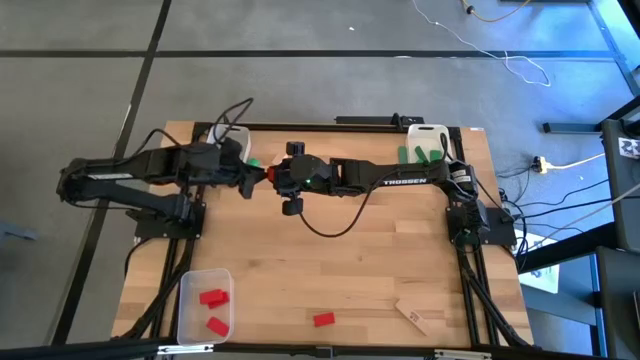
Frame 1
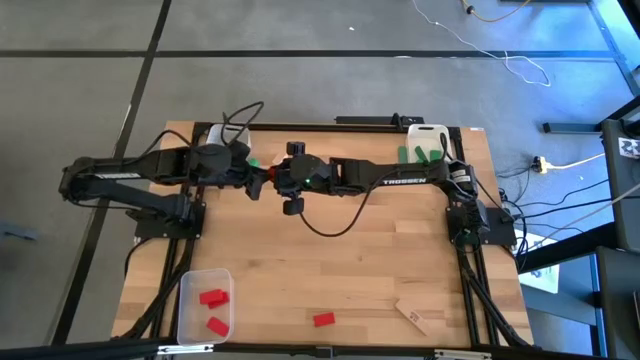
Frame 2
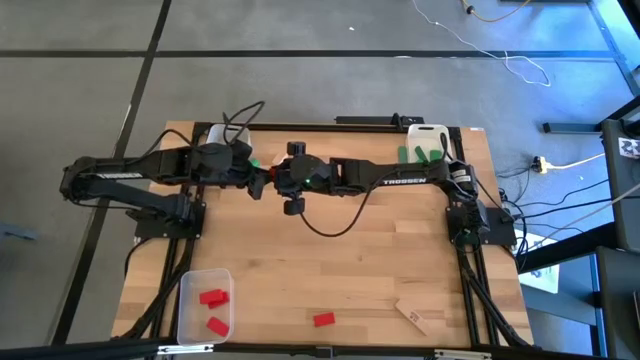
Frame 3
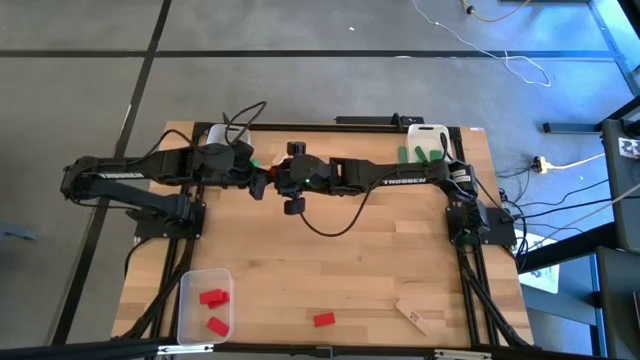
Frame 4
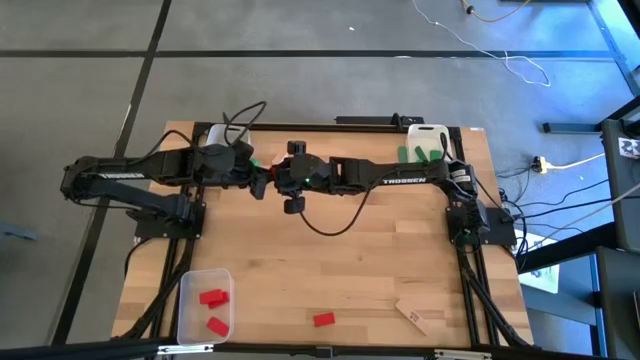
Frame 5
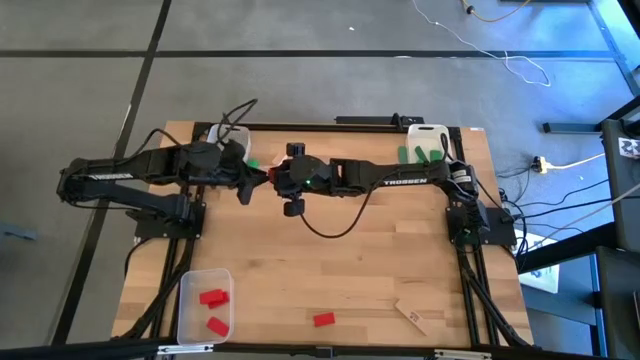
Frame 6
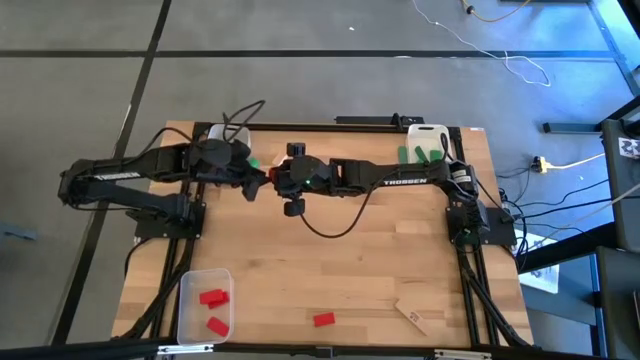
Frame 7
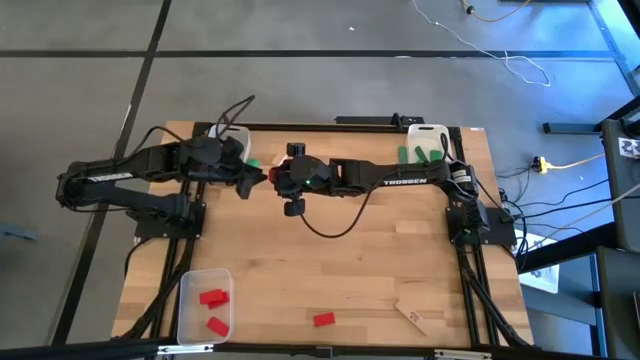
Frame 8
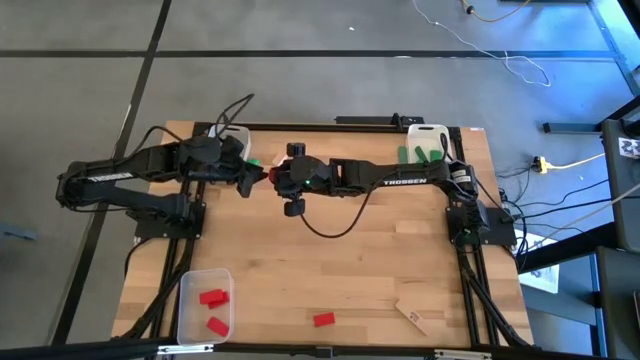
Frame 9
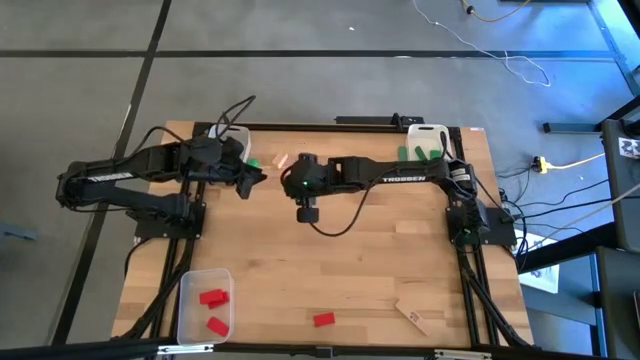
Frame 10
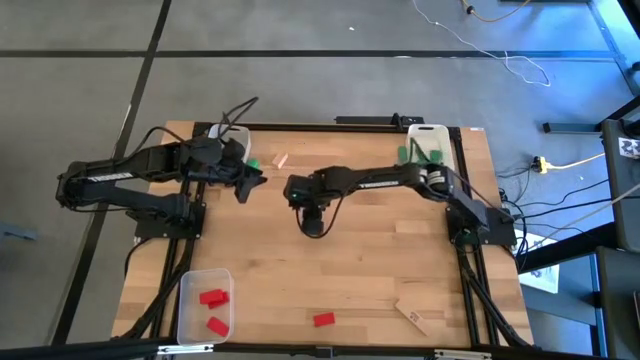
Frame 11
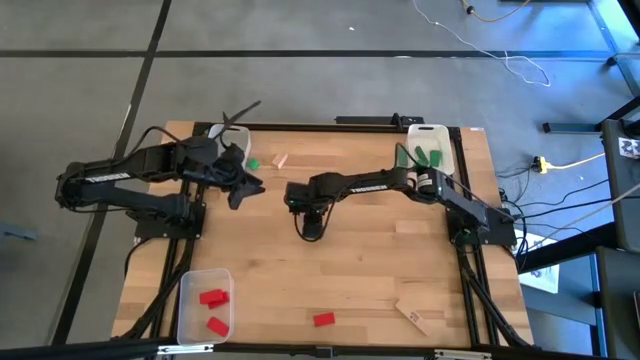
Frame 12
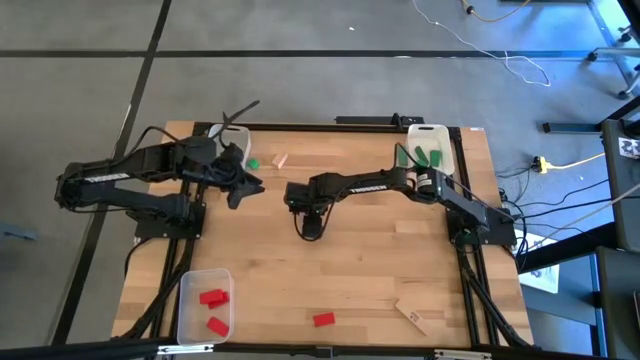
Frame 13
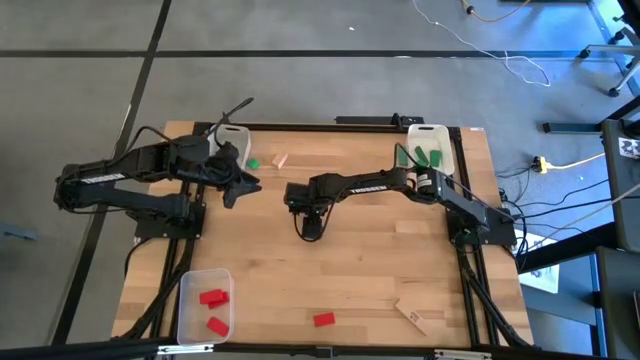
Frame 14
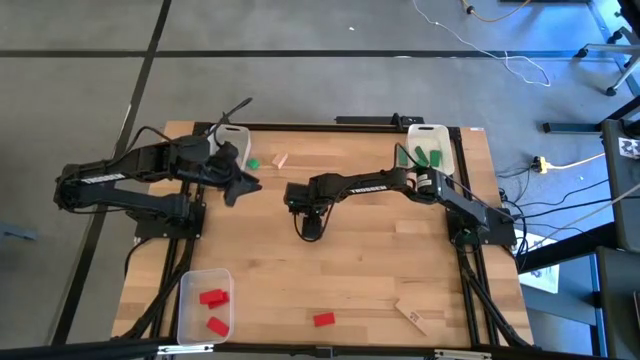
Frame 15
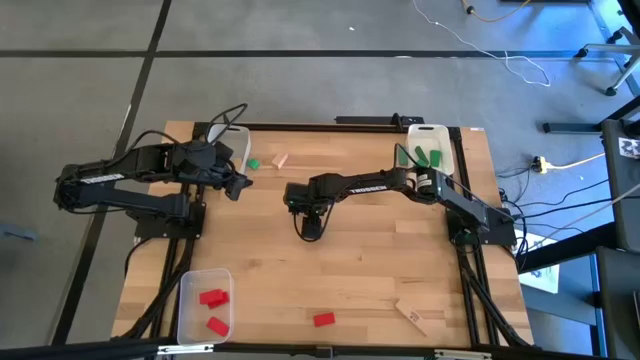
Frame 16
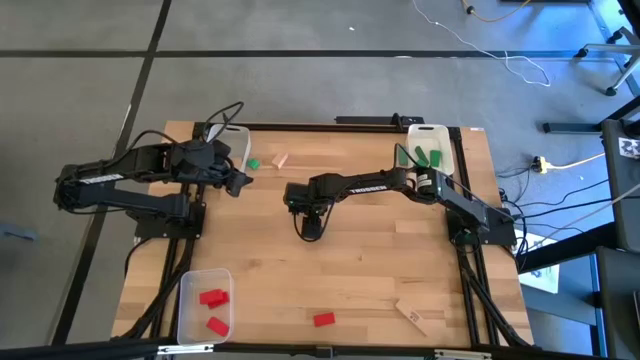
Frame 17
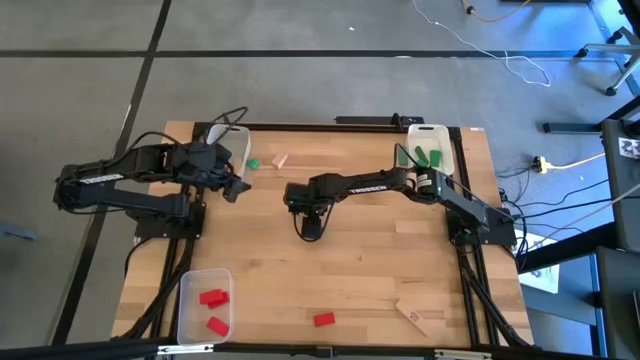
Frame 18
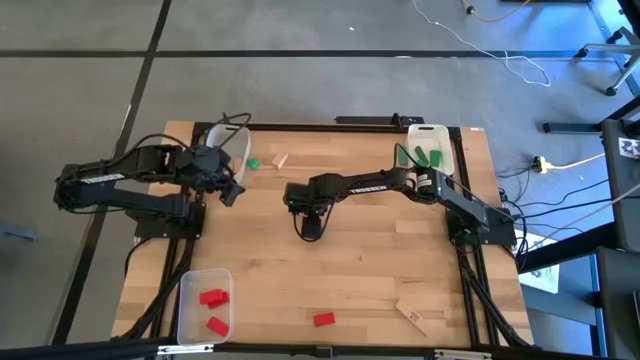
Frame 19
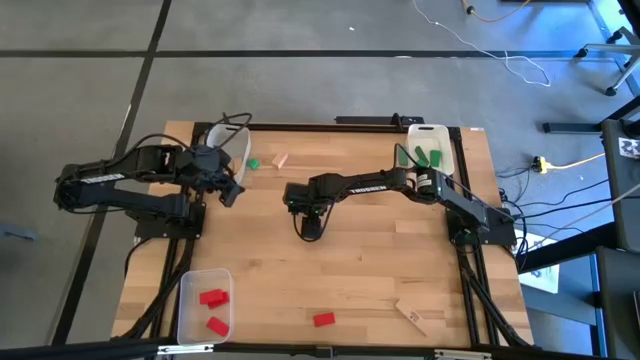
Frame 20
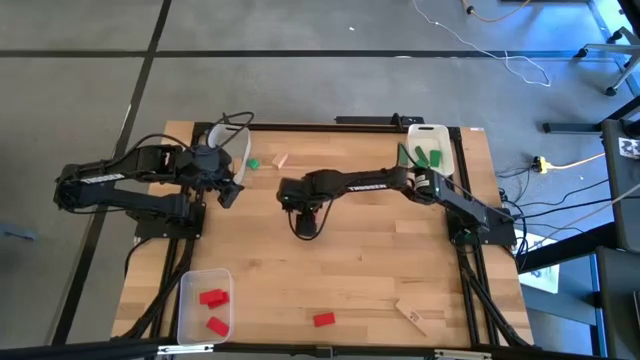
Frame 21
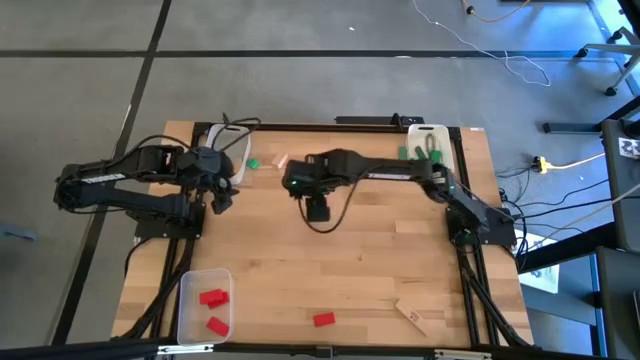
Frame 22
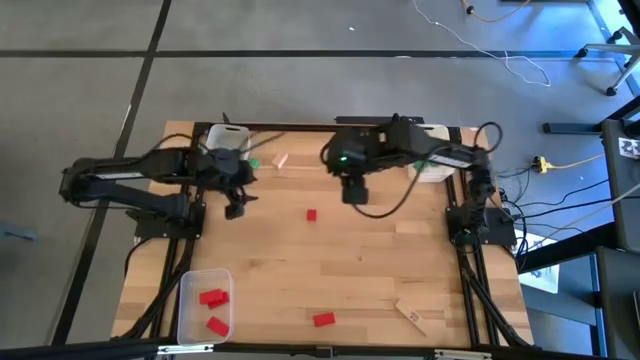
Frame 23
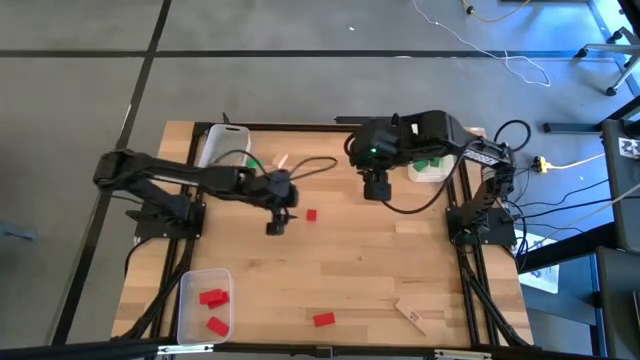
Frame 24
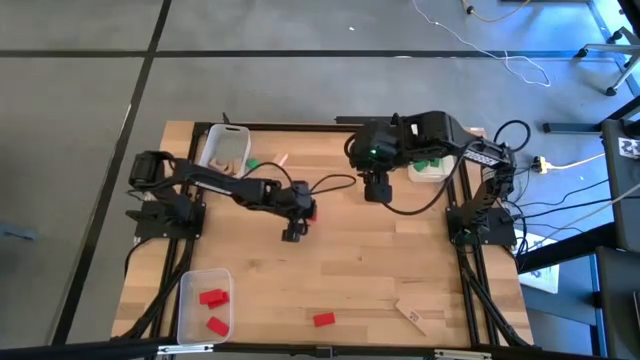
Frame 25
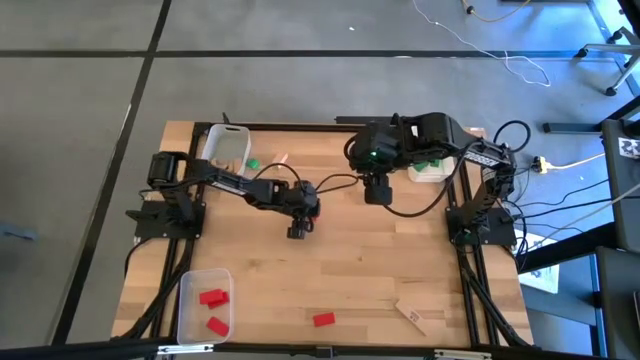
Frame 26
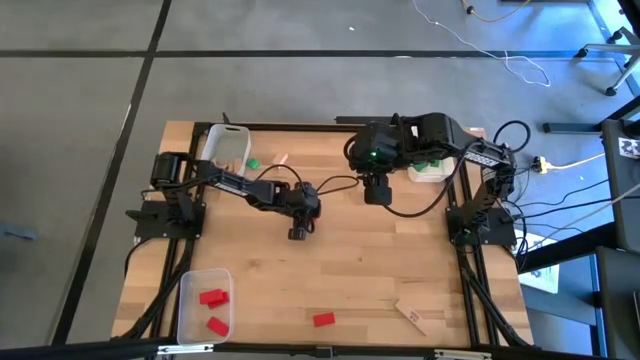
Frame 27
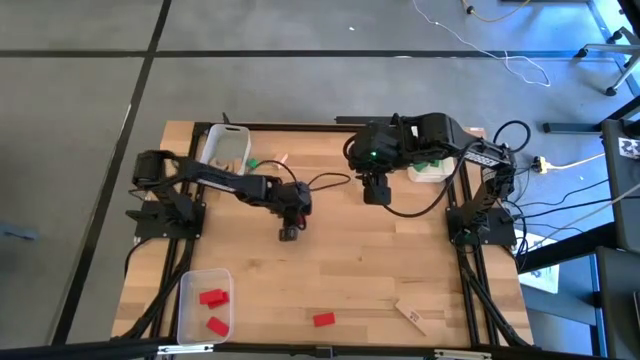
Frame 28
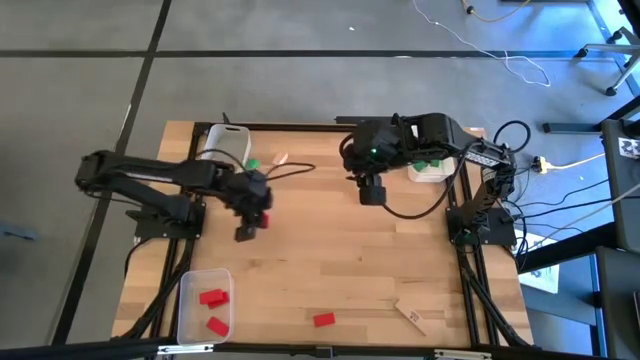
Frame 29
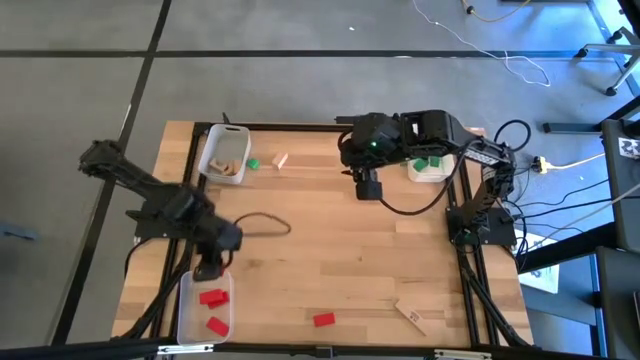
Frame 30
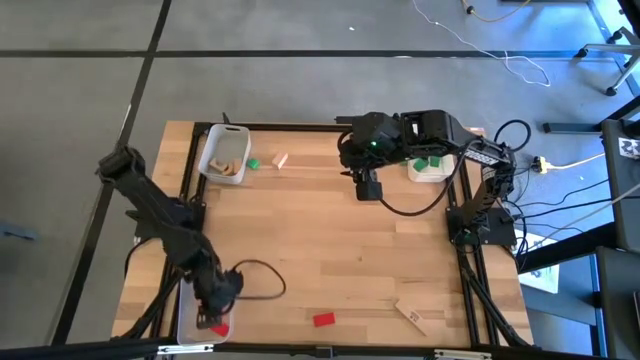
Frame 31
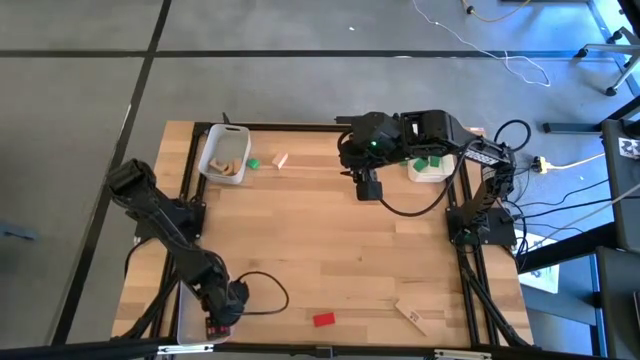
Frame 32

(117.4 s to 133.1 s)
Task: Sort & place blocks by color
Put the red block into the transparent bin

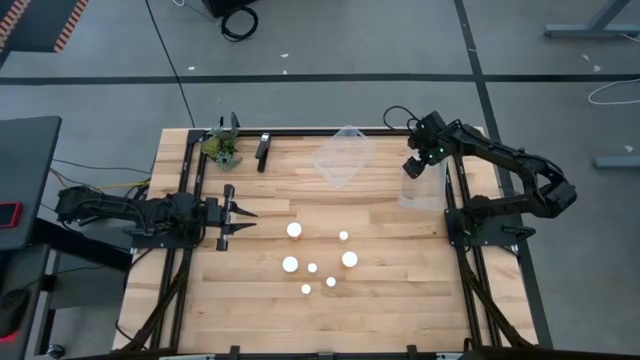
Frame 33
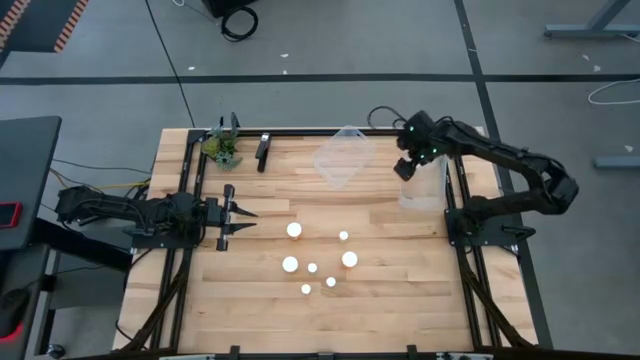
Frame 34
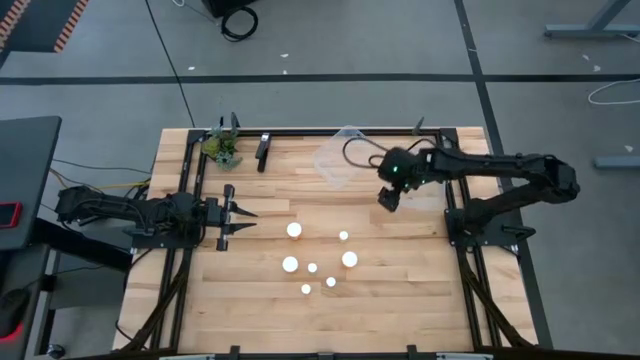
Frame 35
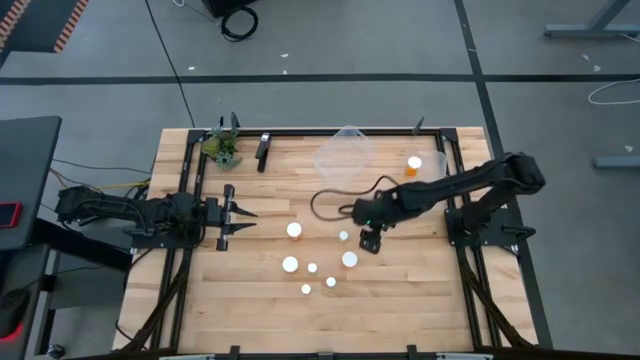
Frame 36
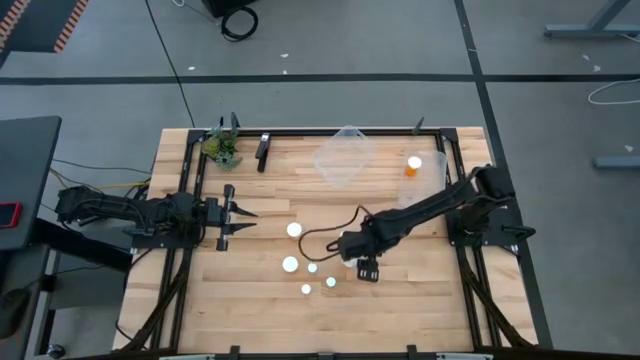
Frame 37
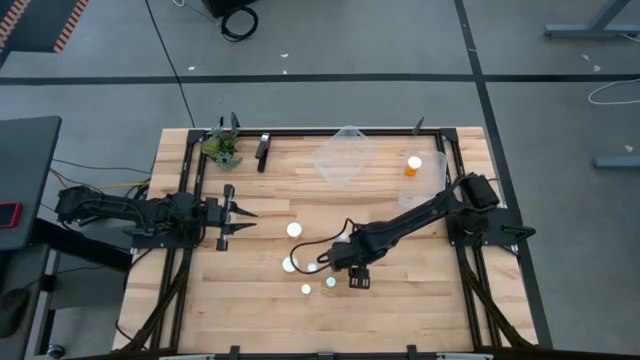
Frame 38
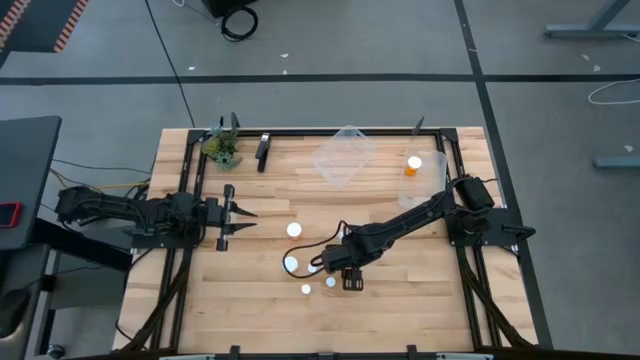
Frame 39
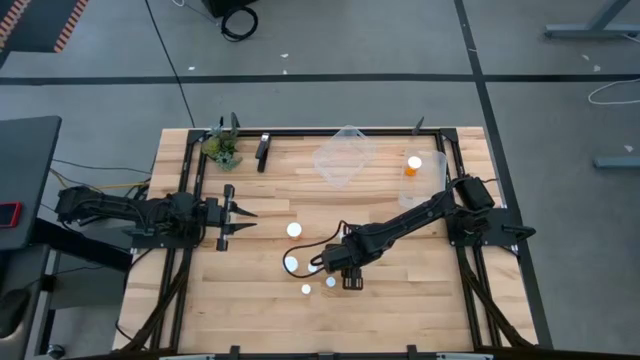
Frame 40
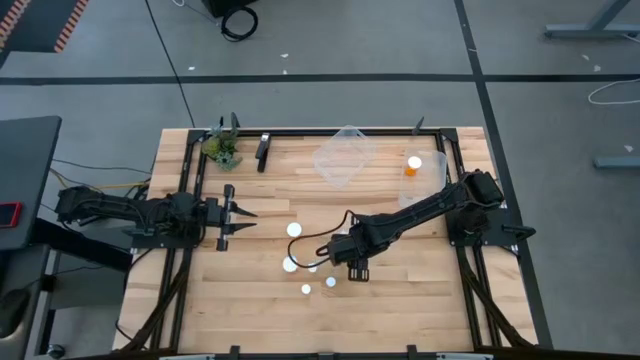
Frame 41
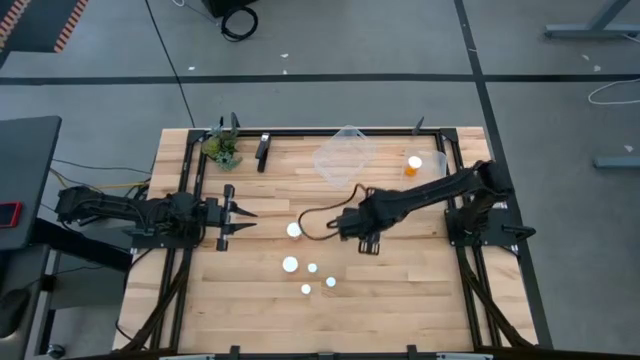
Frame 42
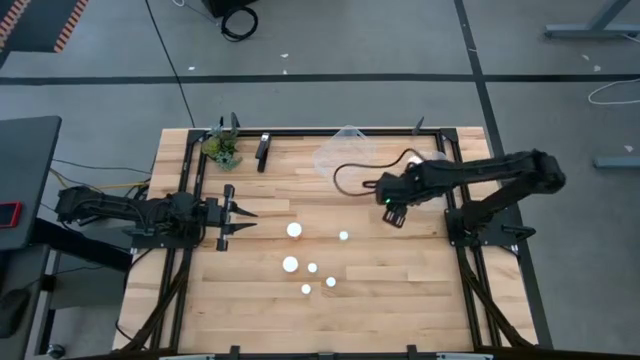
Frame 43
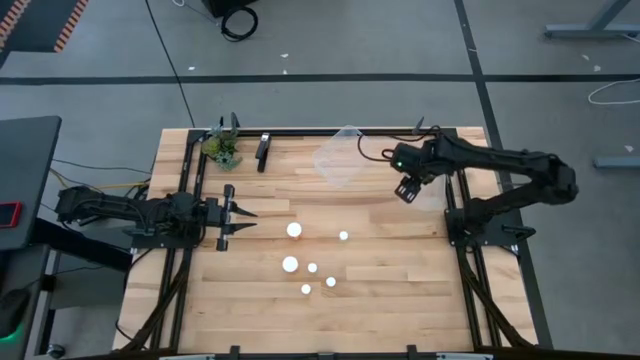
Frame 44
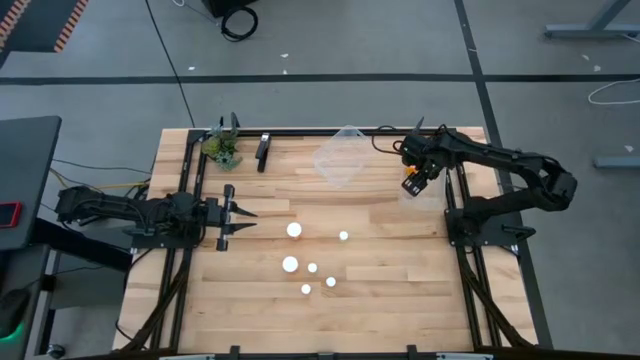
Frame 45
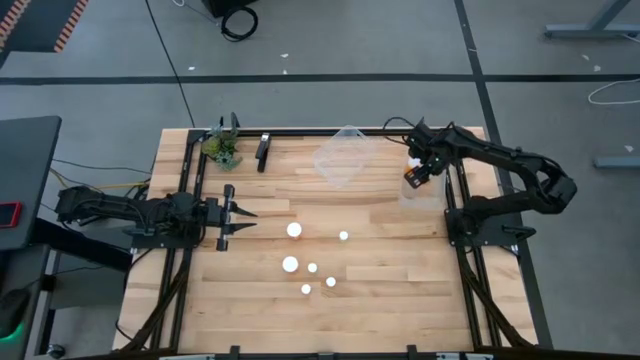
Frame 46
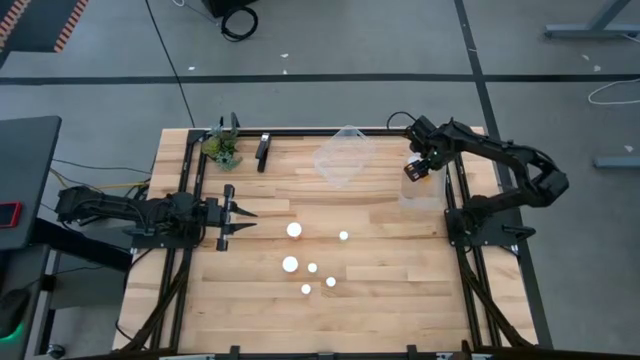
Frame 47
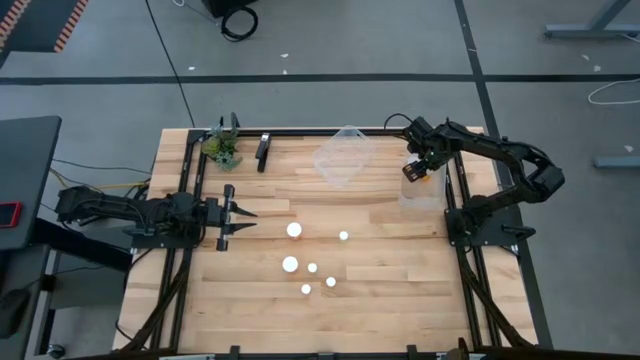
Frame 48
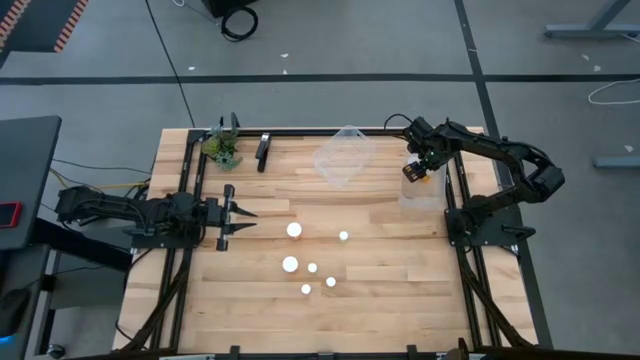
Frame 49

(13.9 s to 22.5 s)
Task: Pick and place medicine bottles into bin by pill shape (circle, oval)
Put the big orange pill bottle into the right transparent bin
